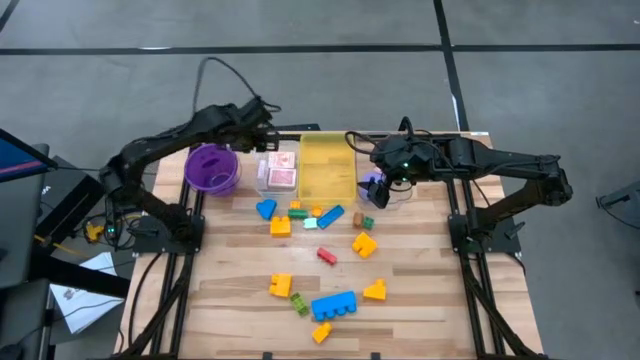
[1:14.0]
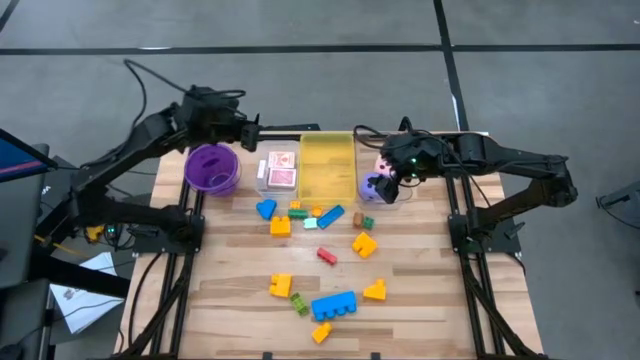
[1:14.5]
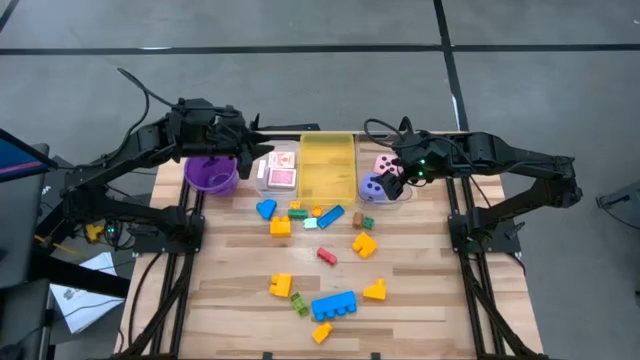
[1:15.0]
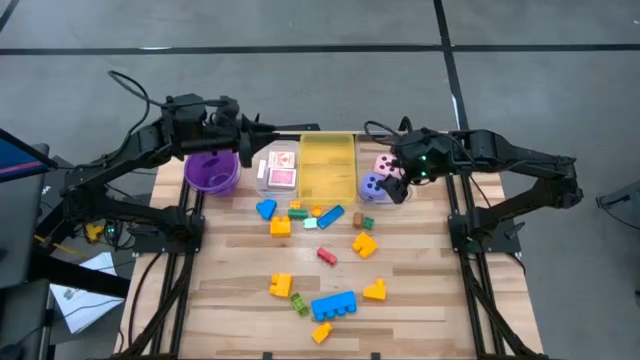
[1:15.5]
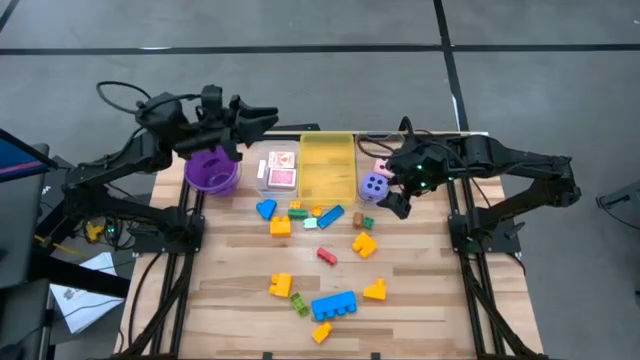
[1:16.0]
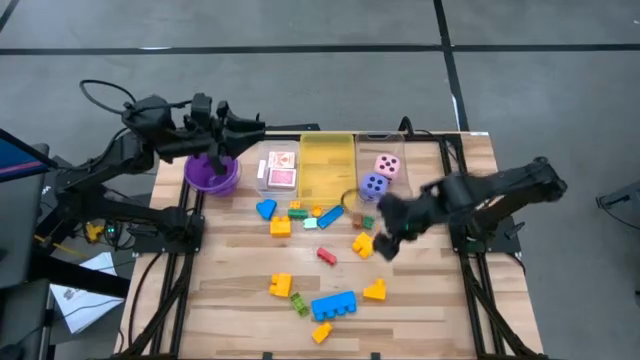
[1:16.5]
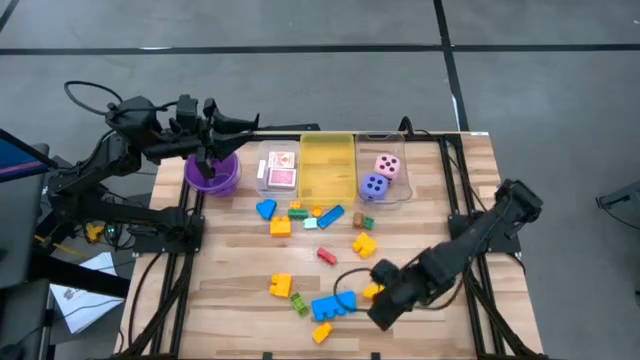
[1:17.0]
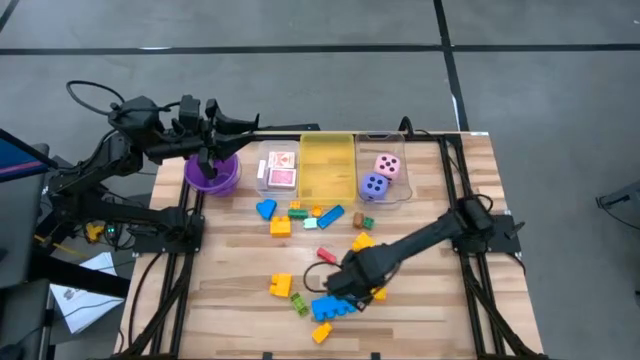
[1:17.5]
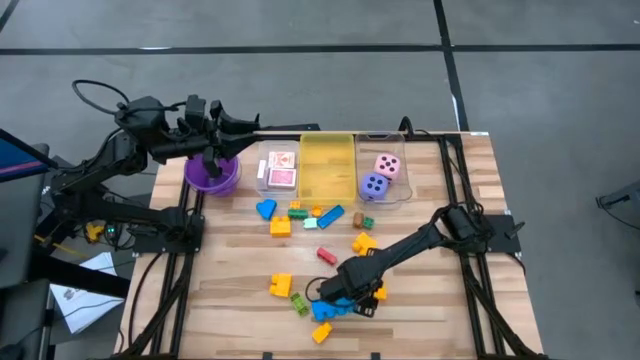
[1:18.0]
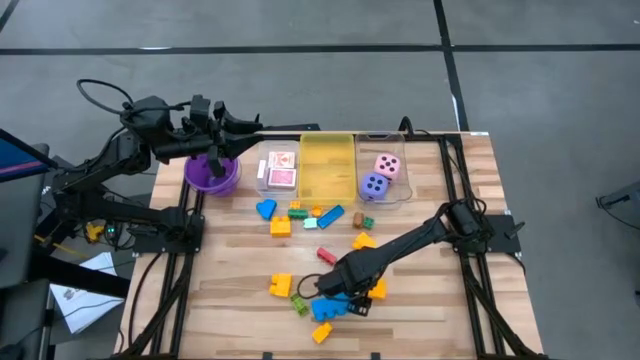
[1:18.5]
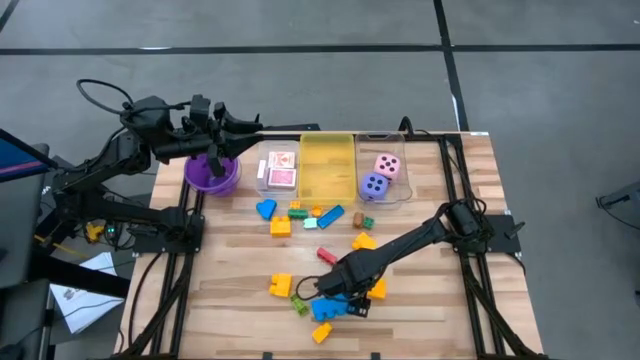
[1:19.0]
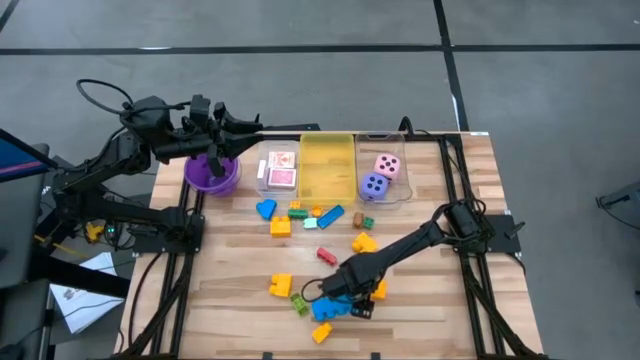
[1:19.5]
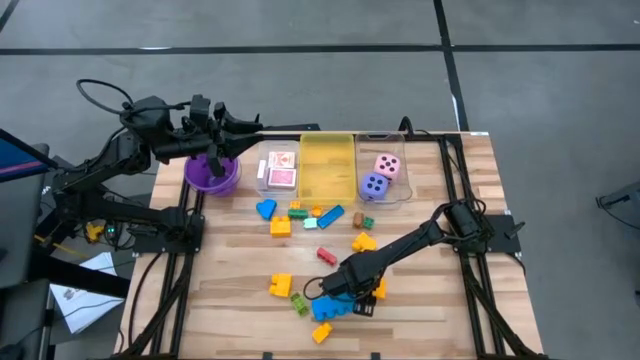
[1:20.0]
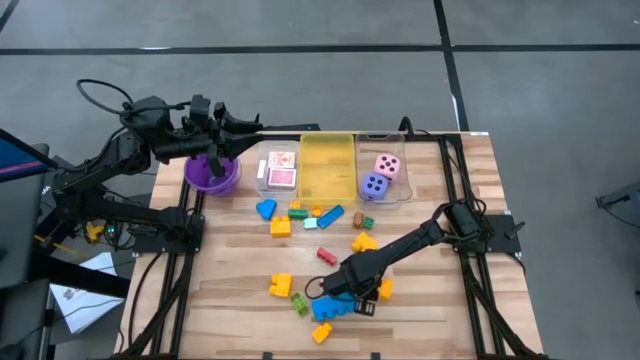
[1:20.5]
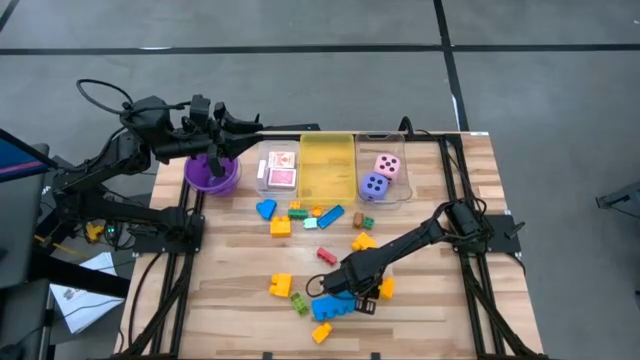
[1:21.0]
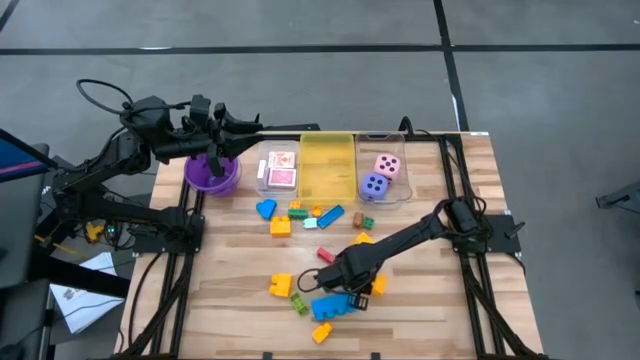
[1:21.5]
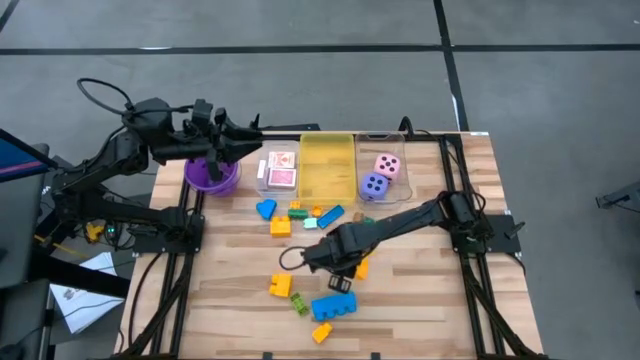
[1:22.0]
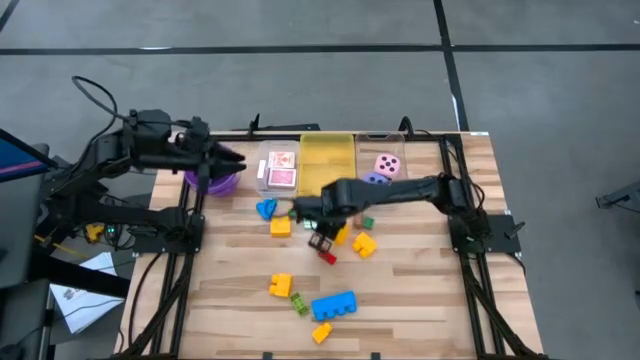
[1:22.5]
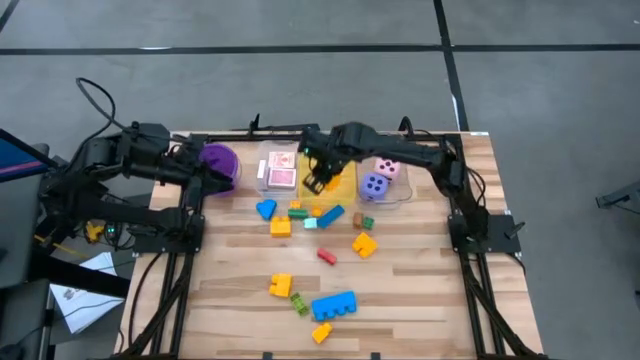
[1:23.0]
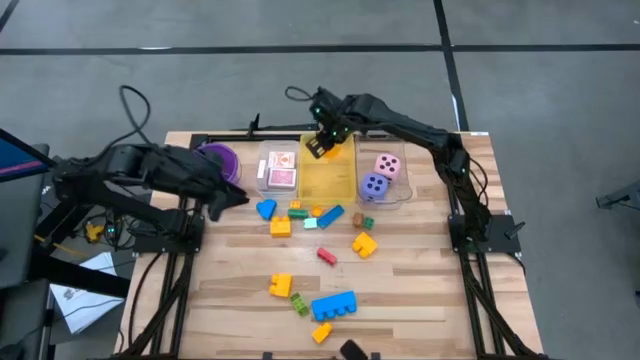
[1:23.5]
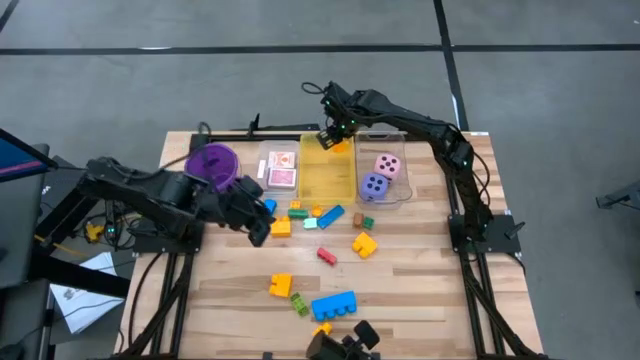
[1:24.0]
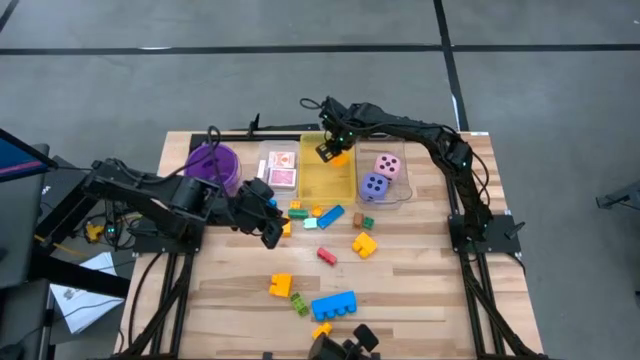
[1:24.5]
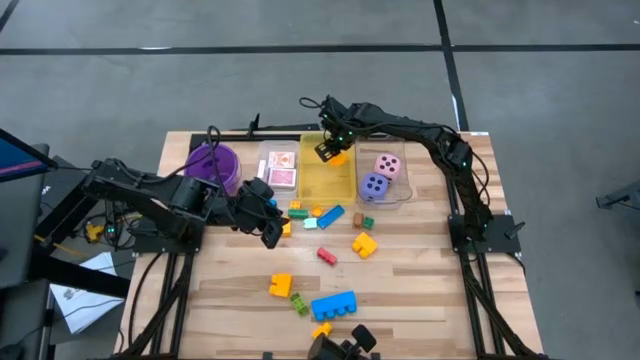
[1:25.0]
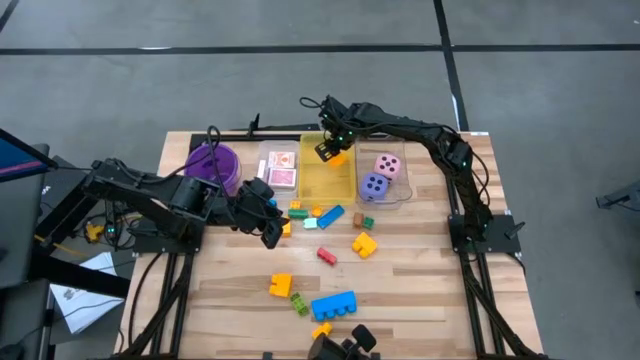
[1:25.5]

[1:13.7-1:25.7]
Task: Pick & Place Toys
Put the yellow gamepiece into the yellow bin

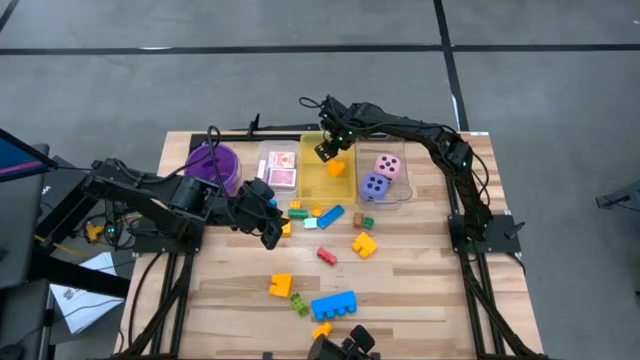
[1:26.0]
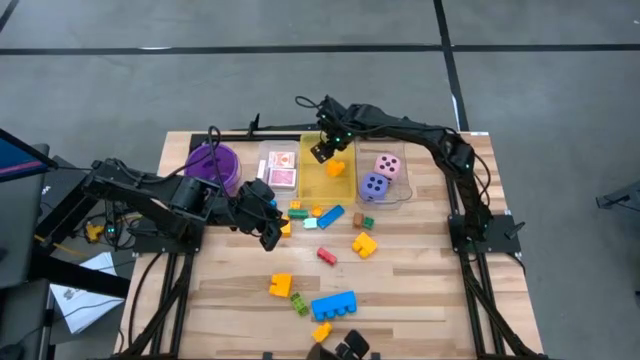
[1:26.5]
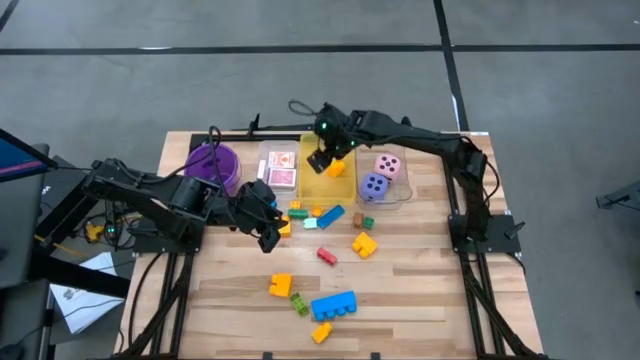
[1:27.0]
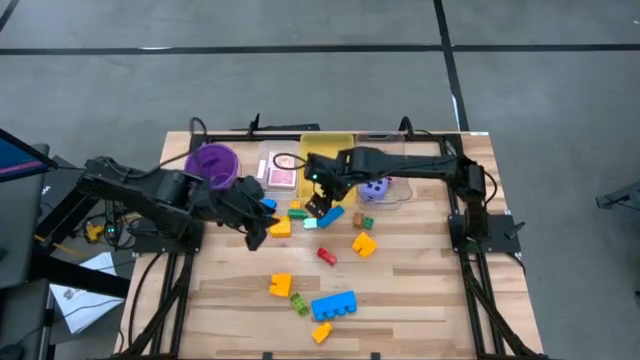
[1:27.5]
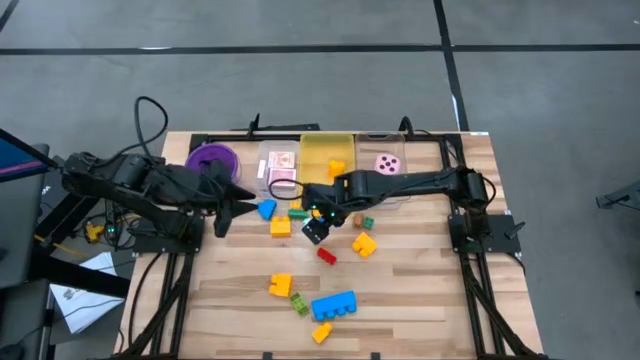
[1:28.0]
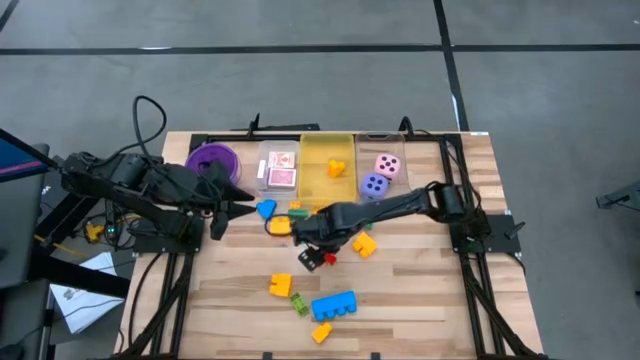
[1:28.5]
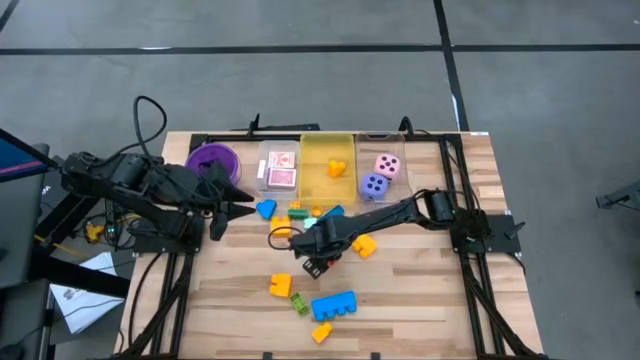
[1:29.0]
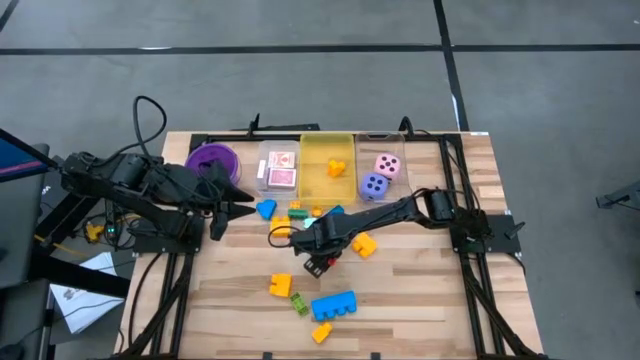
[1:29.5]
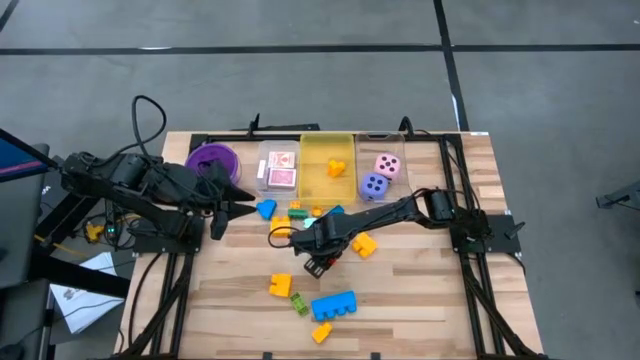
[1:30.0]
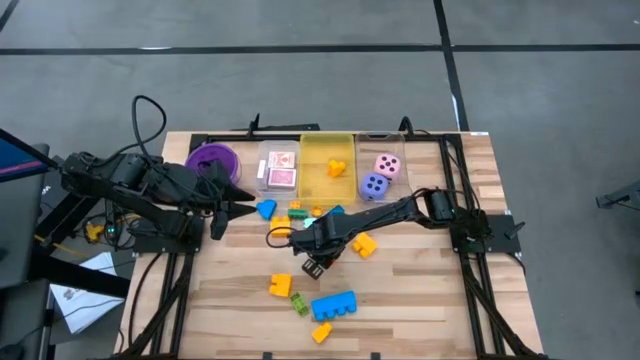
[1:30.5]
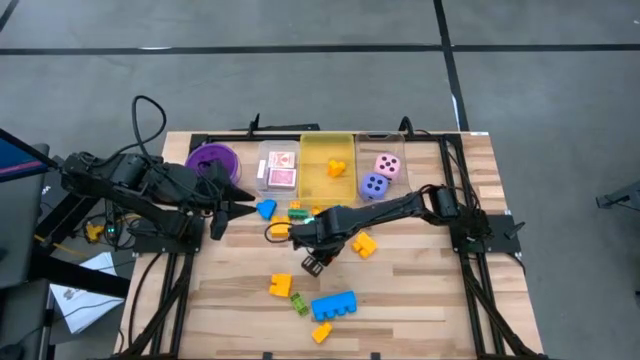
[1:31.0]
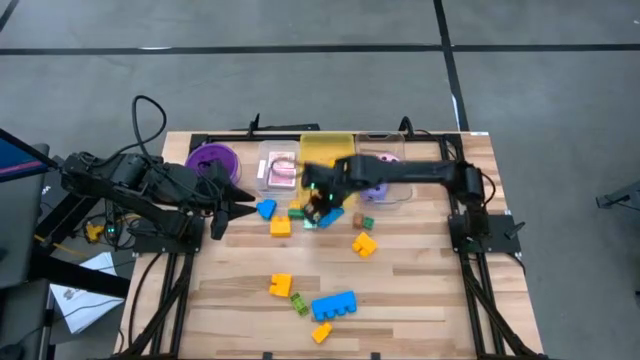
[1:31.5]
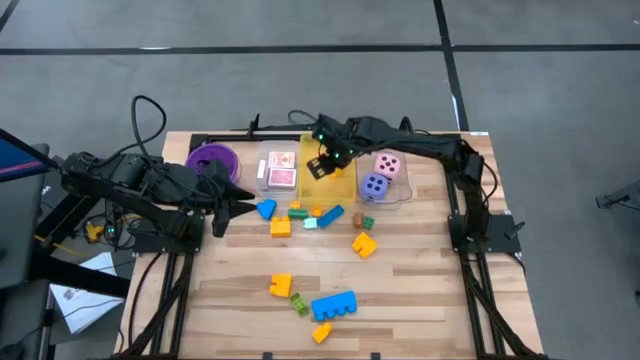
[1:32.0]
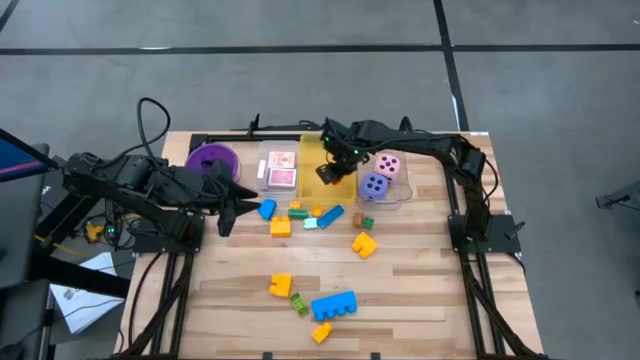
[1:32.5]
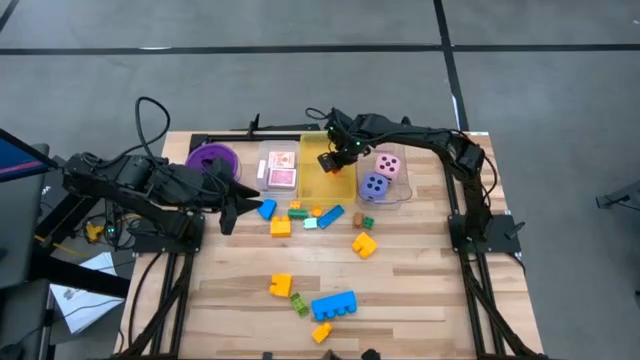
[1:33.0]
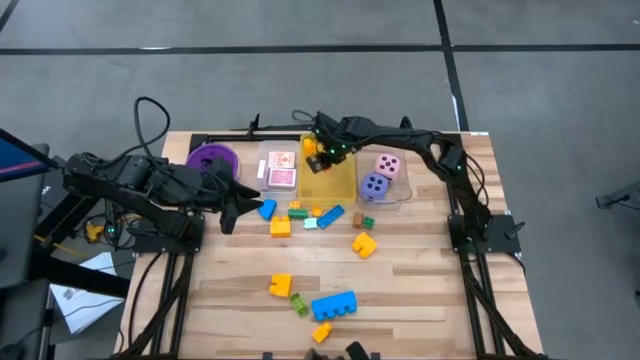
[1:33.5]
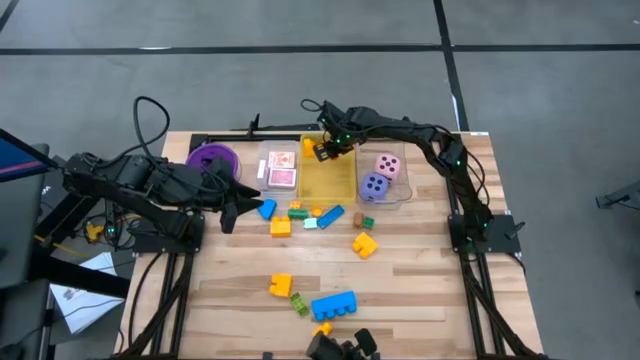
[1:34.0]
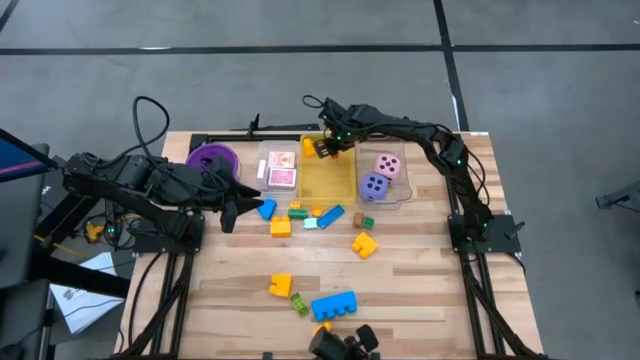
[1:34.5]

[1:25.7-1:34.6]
Put the red gamepiece into the yellow bin
